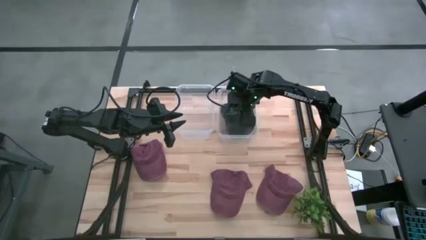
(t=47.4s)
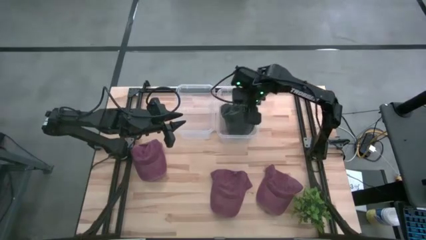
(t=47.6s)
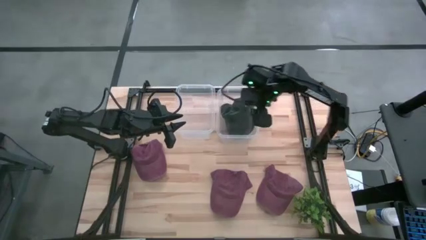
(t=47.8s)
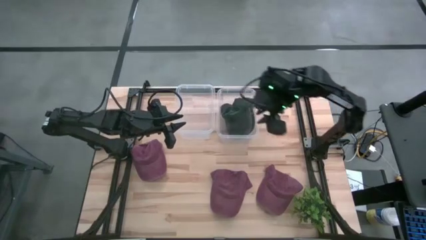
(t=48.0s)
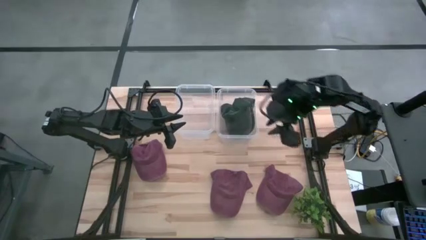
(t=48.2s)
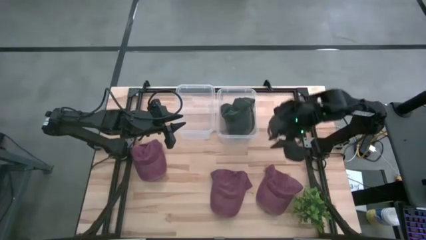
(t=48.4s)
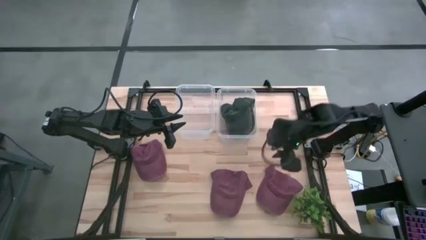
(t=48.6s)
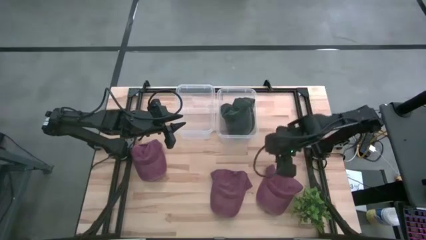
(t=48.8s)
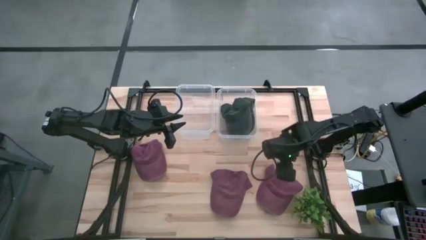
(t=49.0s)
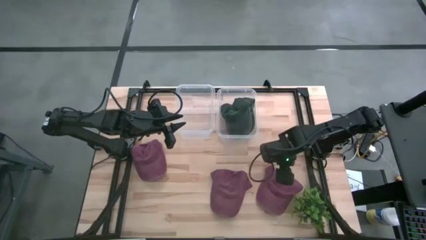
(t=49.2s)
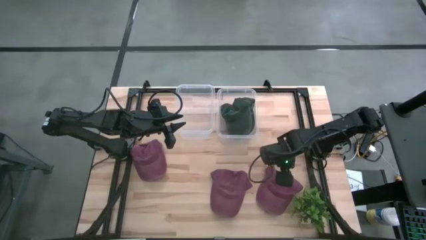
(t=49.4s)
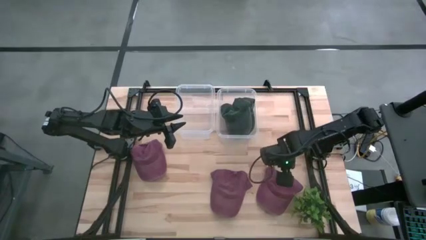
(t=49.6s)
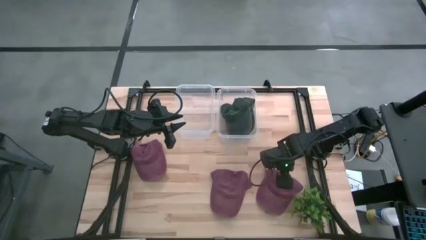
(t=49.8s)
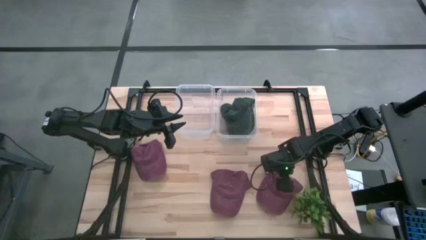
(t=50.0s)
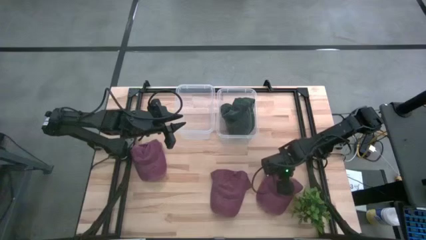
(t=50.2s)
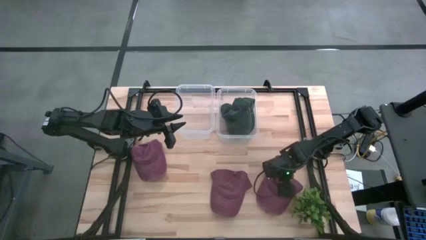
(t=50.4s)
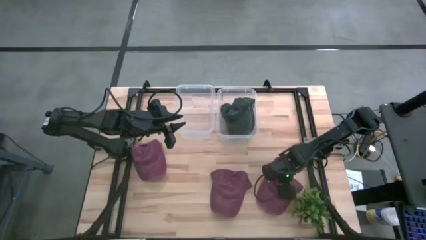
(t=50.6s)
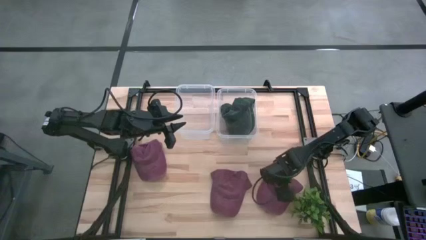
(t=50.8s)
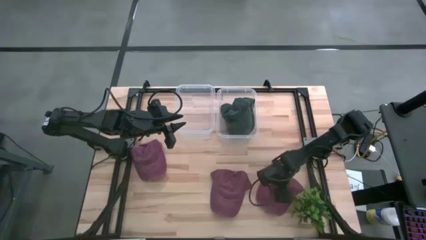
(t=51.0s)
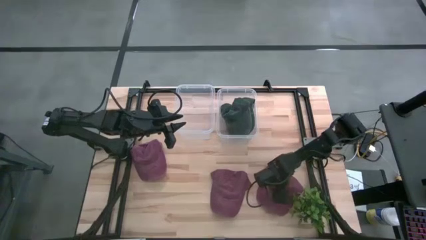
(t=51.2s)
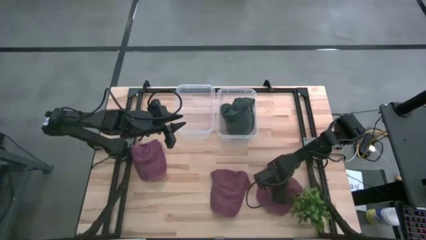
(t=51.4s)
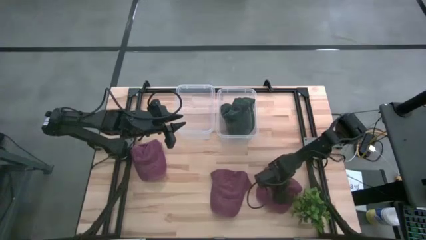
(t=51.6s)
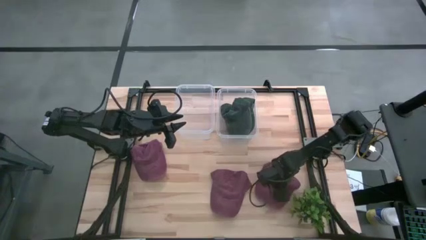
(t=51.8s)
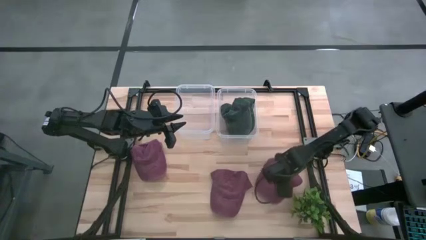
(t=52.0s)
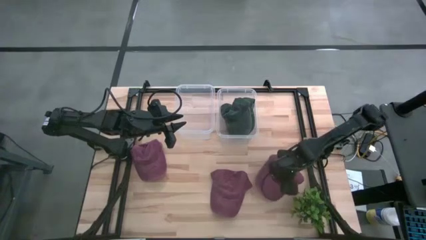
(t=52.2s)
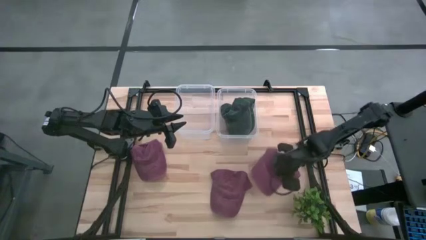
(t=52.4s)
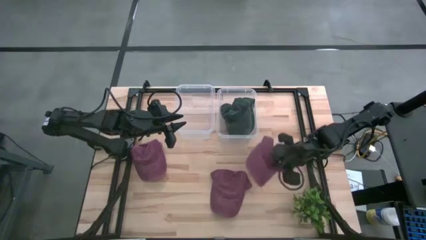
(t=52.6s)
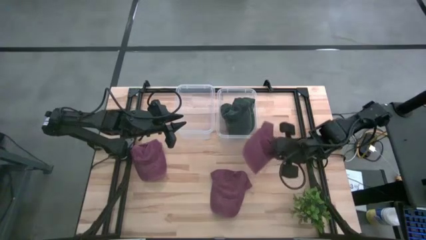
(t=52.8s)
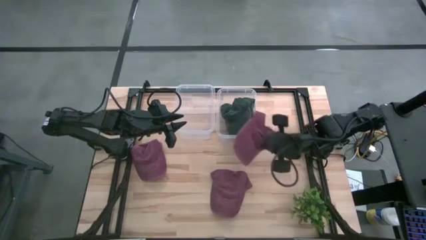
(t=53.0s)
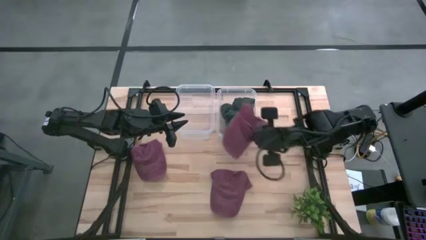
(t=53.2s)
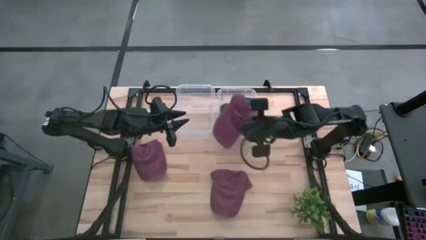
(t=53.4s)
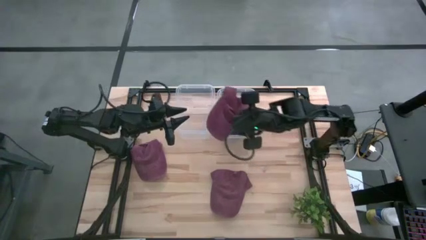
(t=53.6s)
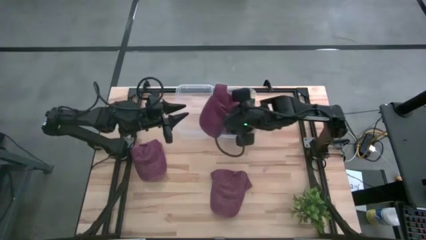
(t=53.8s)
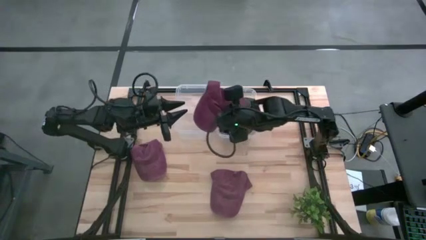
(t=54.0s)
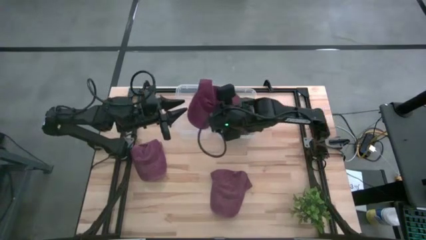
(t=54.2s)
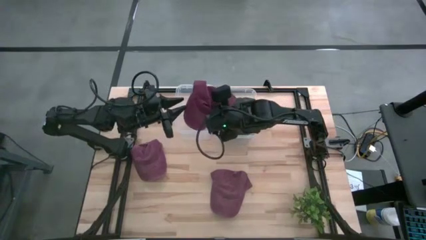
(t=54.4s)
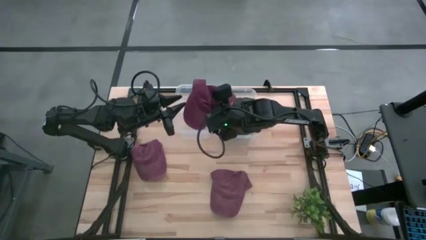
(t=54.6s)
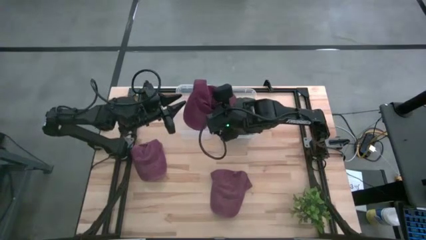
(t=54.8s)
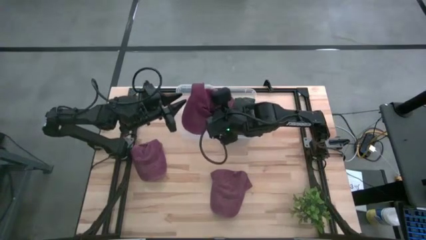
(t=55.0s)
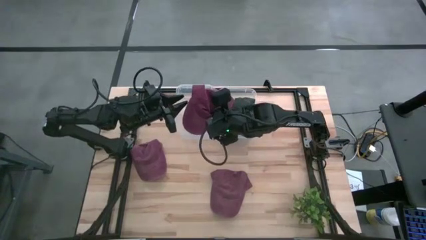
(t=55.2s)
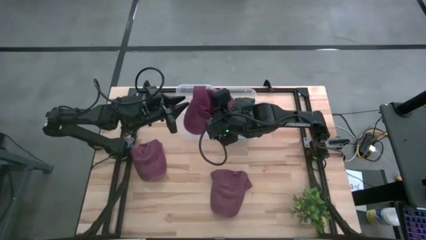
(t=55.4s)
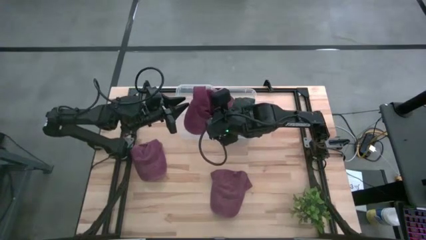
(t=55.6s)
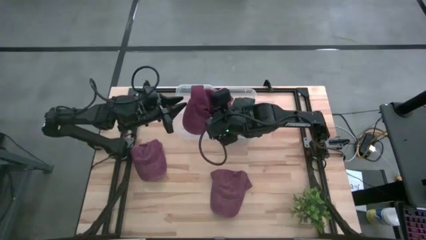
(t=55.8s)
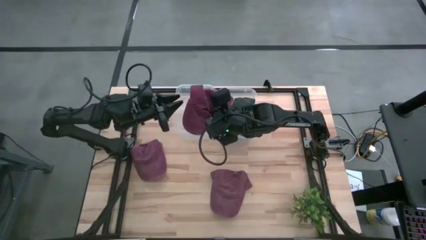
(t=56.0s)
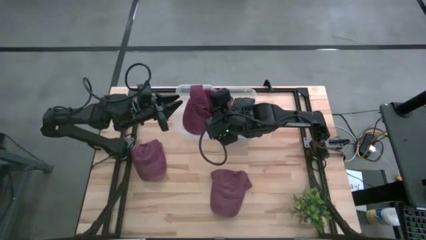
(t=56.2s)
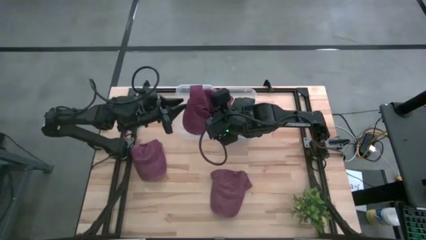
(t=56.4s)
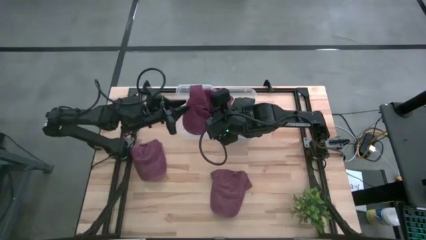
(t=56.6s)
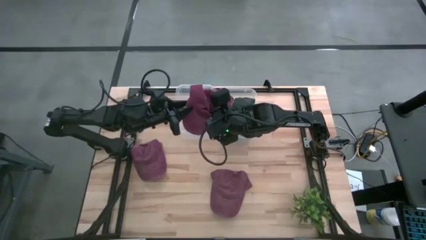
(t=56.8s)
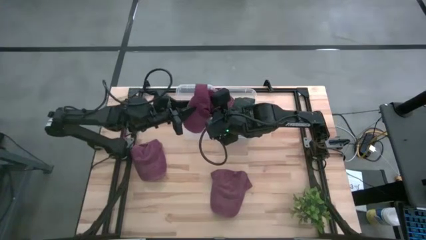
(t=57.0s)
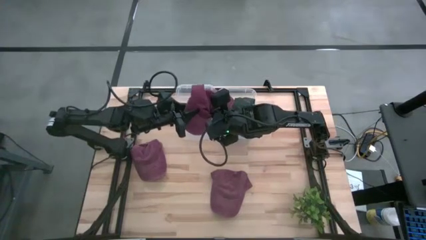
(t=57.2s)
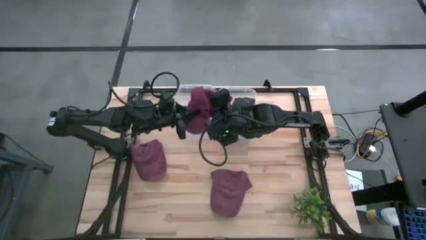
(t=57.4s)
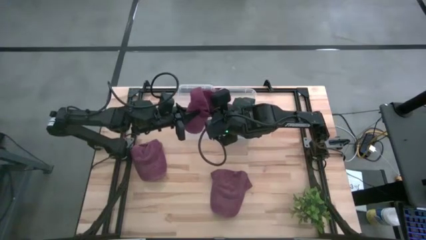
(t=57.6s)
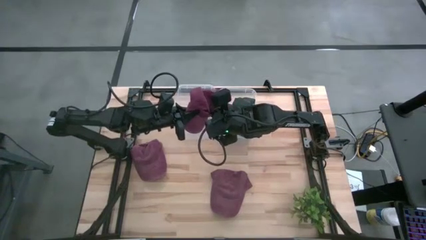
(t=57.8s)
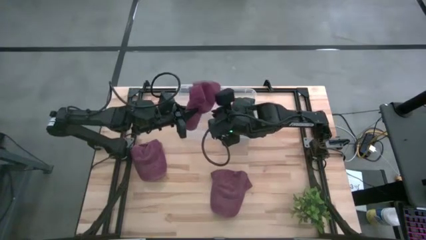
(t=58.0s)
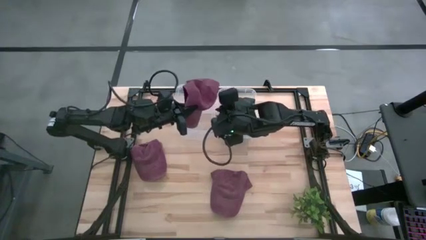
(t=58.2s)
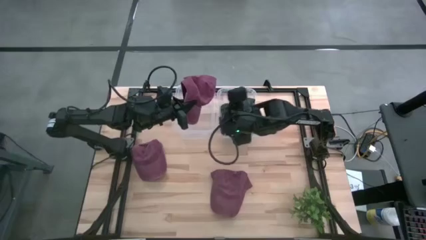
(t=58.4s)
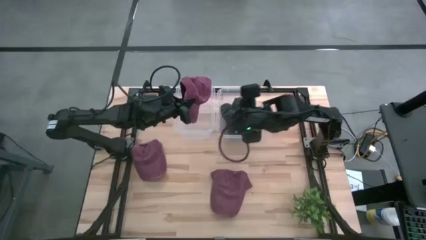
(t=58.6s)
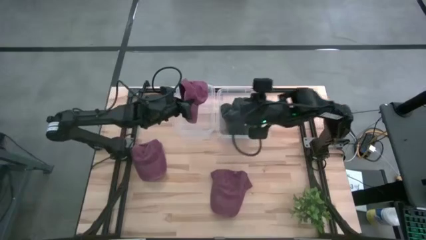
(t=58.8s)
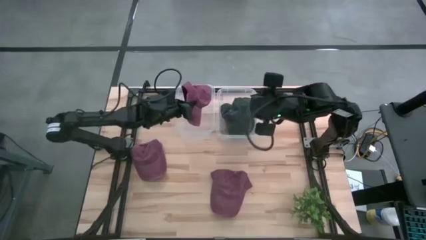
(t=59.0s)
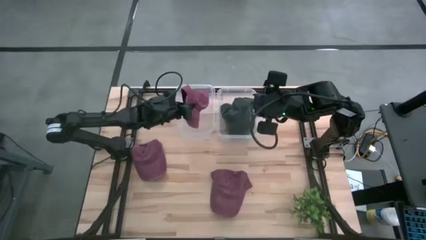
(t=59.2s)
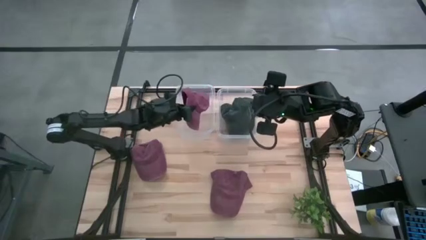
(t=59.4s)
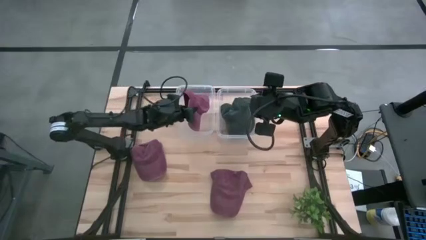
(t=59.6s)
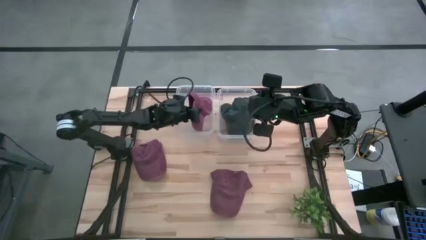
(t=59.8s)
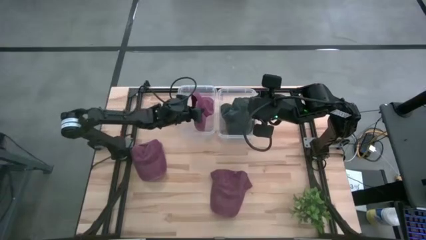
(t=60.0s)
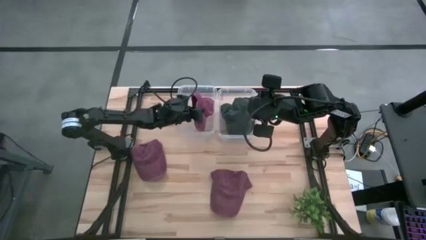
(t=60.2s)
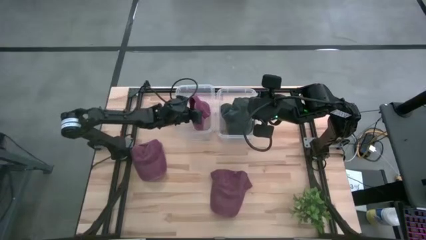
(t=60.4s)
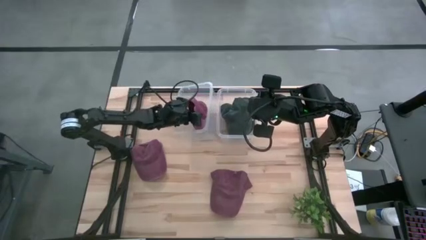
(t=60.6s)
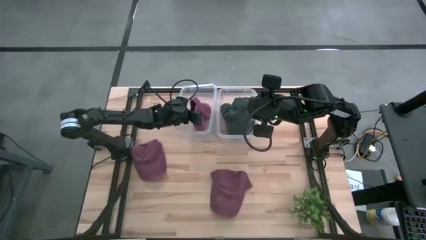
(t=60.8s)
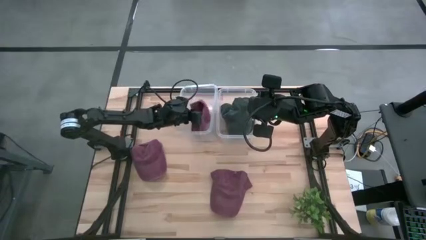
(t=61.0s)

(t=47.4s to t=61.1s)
Task: Pick & Place hat
Put the right red cap into the left transparent bin

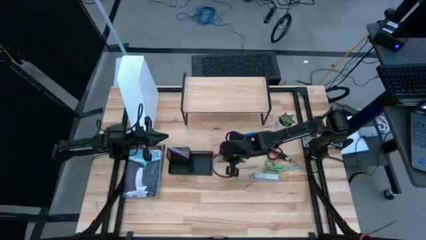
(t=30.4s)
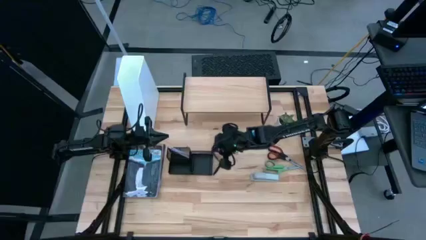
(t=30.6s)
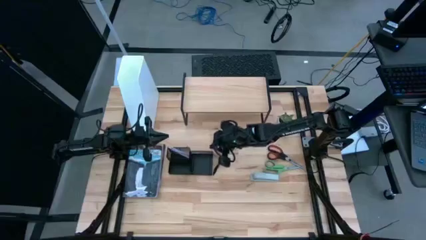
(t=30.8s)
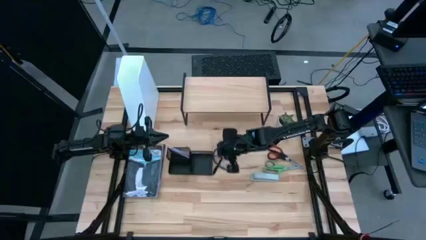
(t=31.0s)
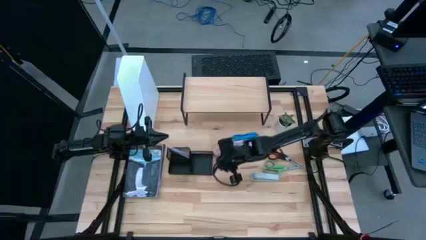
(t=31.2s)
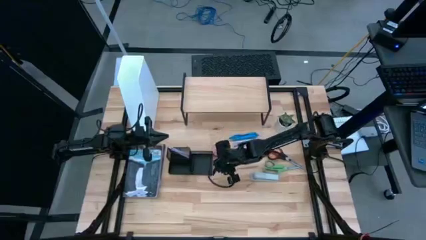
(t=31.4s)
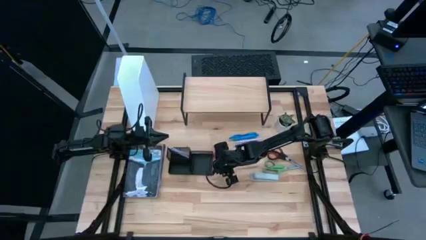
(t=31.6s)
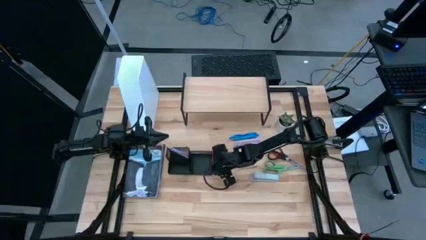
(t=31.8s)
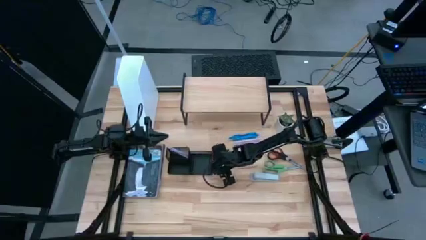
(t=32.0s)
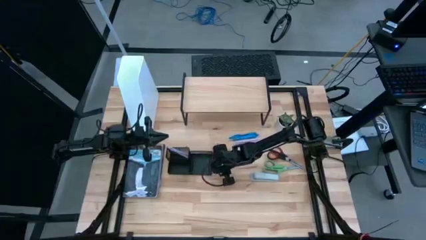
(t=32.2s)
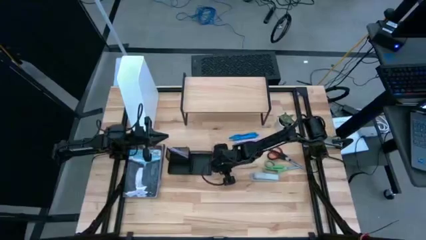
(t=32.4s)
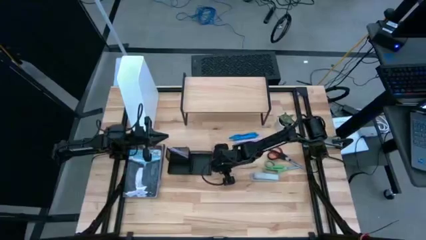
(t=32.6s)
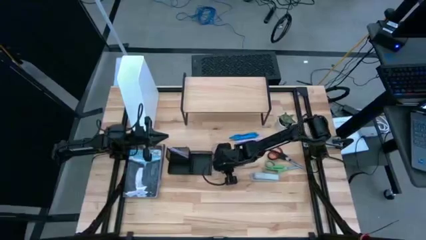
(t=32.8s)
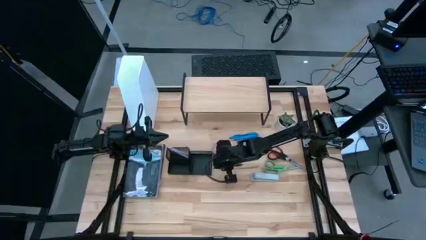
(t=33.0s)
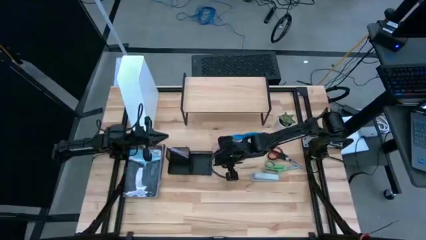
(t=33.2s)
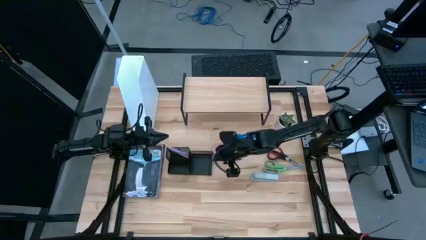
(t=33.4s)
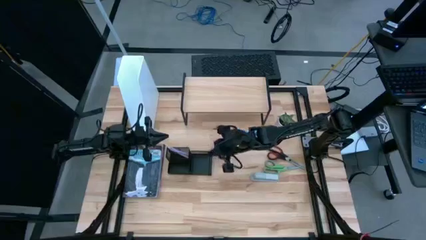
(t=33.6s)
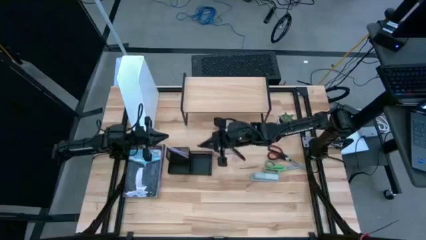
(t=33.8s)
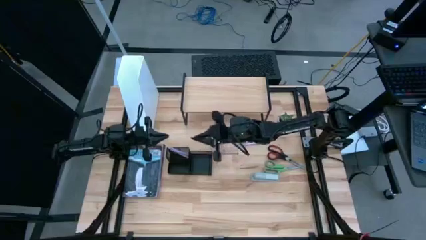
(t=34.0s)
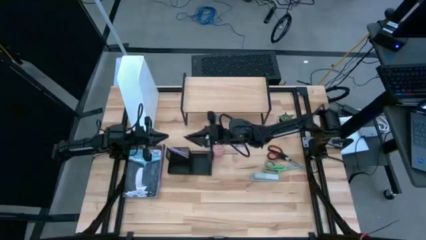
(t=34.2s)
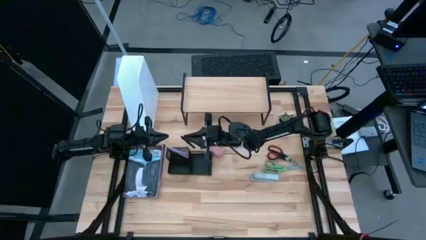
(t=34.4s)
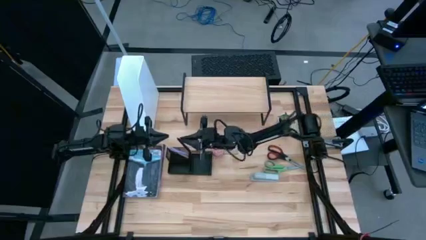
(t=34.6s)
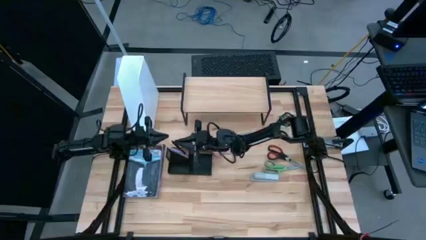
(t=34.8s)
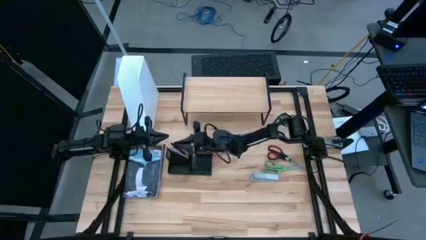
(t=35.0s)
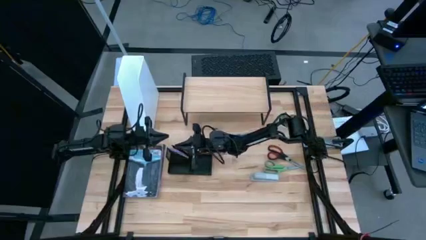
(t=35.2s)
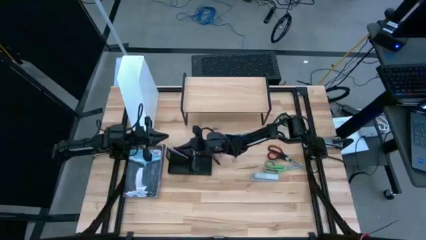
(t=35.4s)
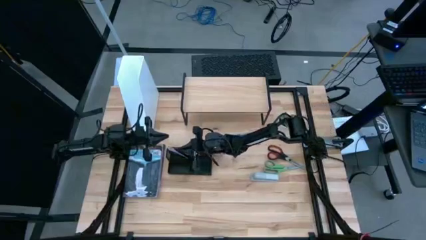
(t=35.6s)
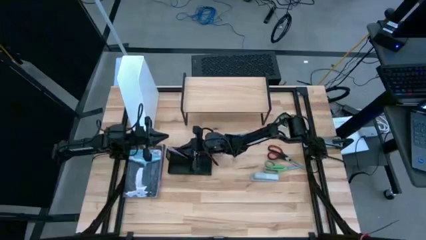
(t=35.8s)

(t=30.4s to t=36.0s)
Task: Stock shelves
Put the black pen into the desk organizer
